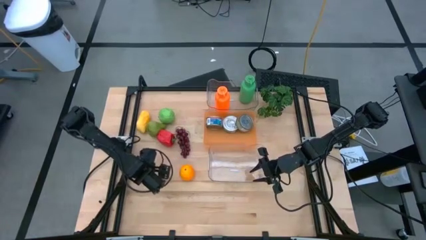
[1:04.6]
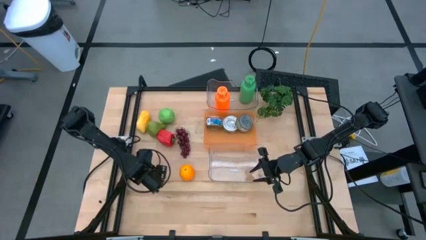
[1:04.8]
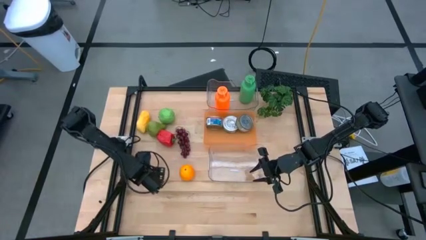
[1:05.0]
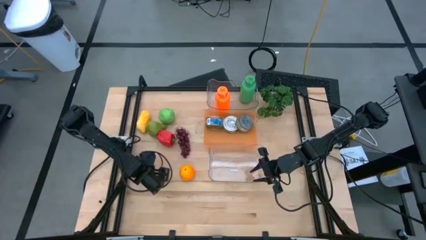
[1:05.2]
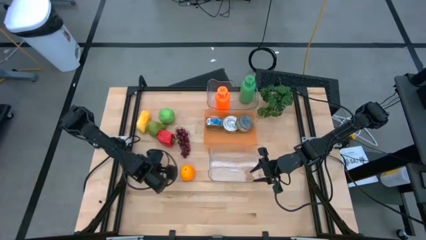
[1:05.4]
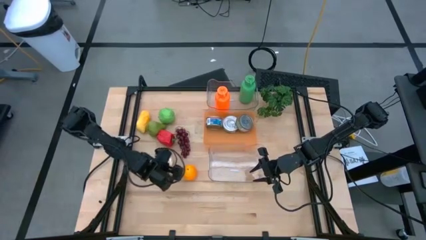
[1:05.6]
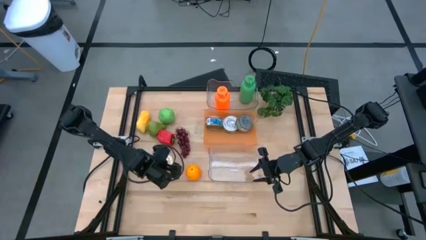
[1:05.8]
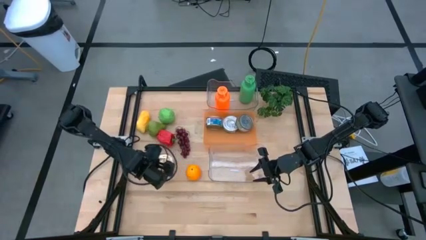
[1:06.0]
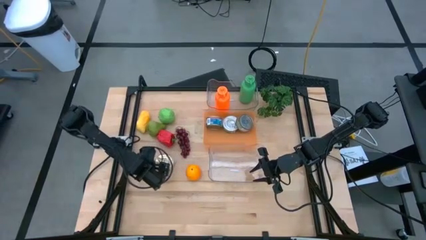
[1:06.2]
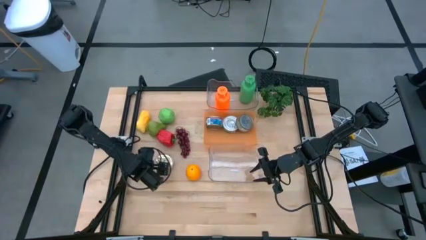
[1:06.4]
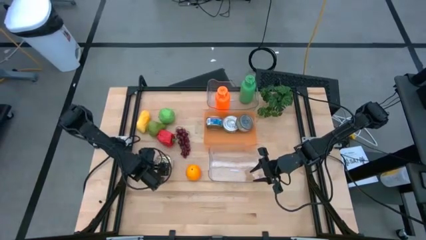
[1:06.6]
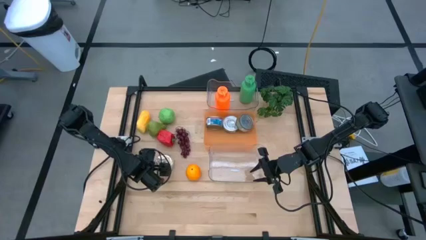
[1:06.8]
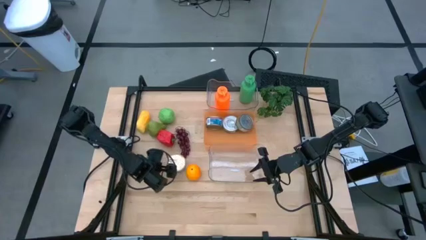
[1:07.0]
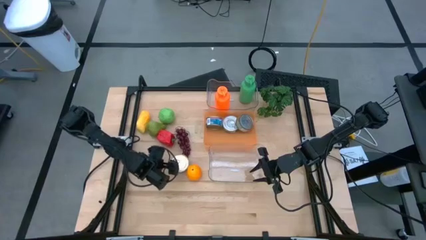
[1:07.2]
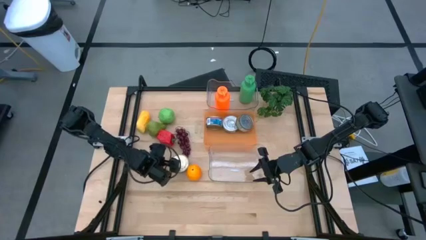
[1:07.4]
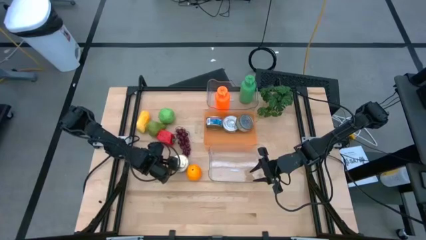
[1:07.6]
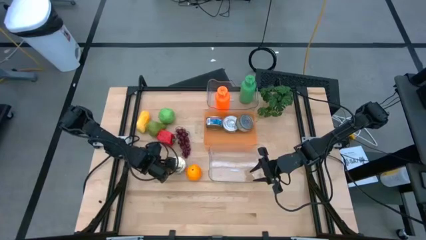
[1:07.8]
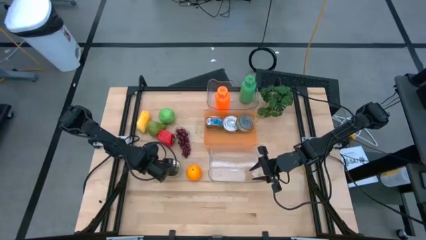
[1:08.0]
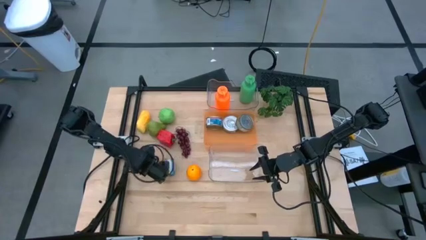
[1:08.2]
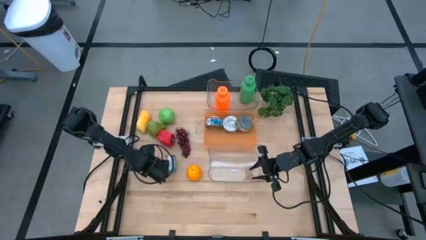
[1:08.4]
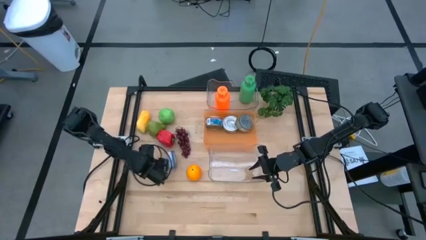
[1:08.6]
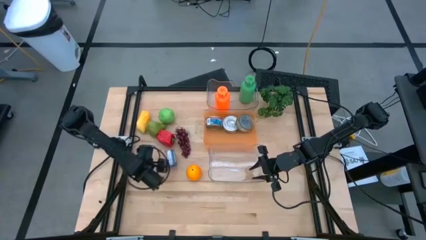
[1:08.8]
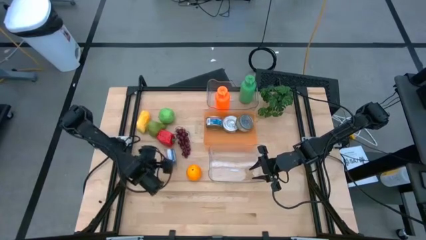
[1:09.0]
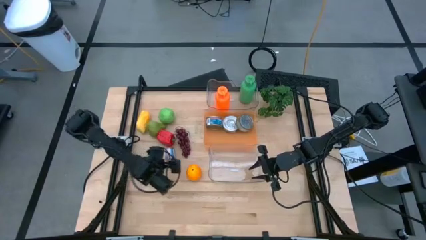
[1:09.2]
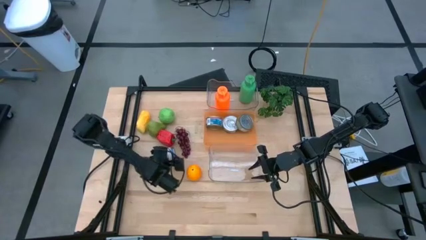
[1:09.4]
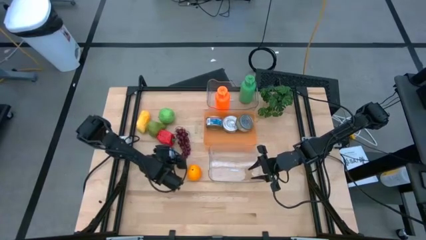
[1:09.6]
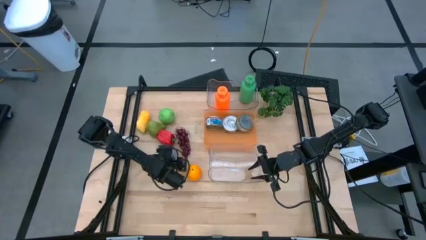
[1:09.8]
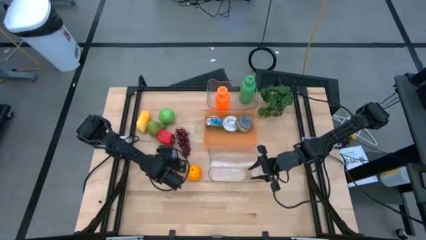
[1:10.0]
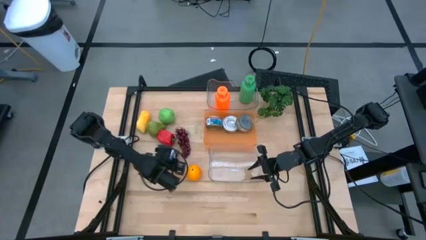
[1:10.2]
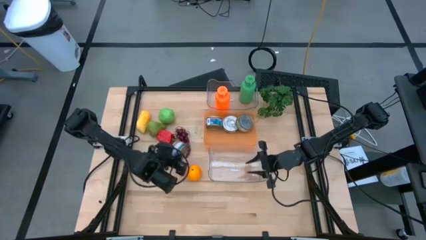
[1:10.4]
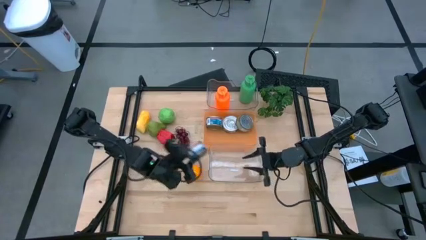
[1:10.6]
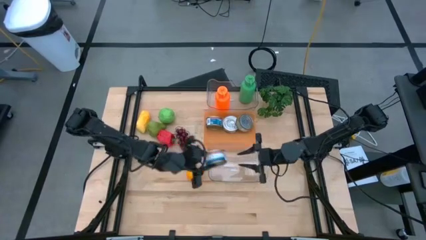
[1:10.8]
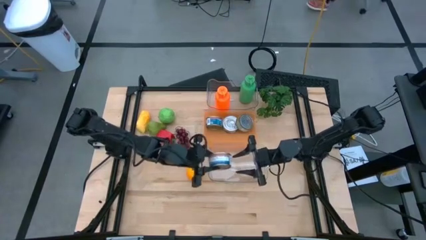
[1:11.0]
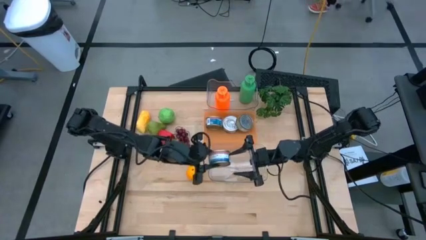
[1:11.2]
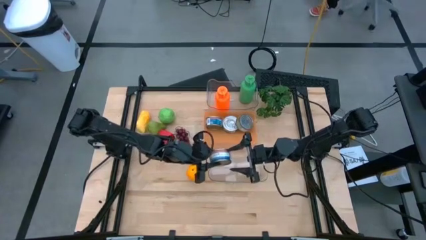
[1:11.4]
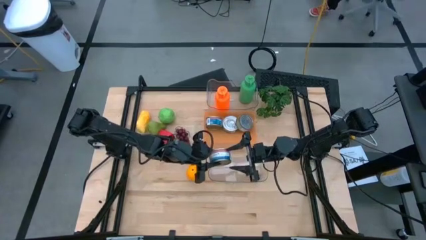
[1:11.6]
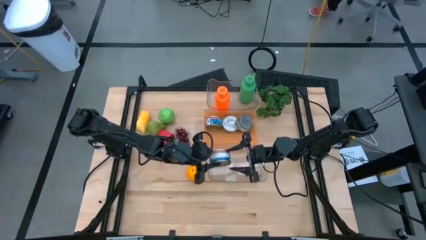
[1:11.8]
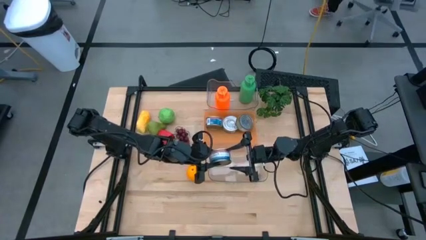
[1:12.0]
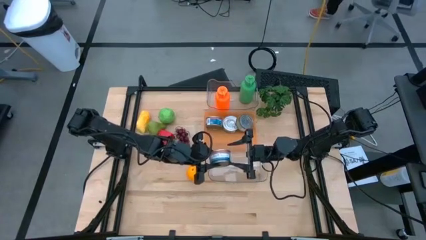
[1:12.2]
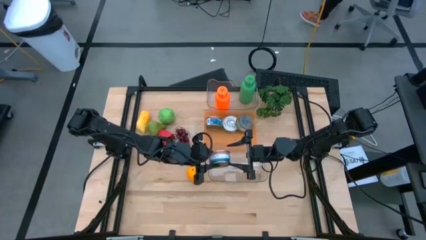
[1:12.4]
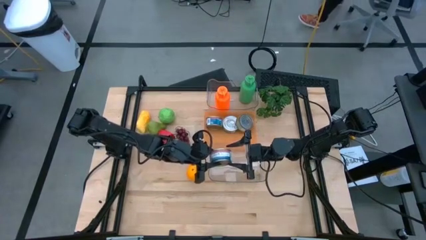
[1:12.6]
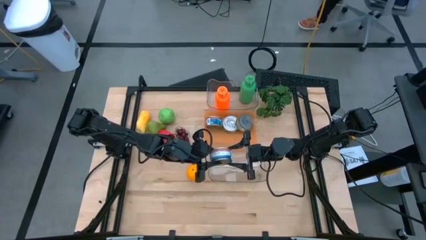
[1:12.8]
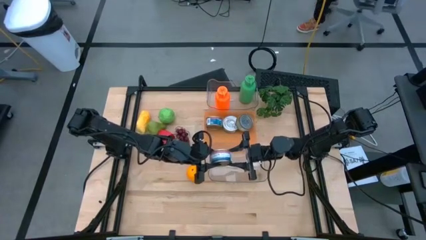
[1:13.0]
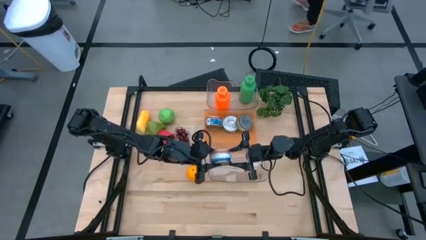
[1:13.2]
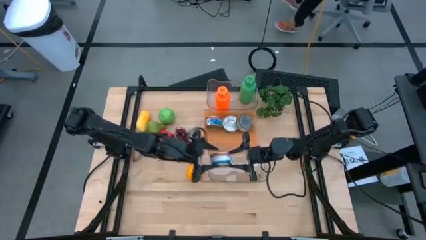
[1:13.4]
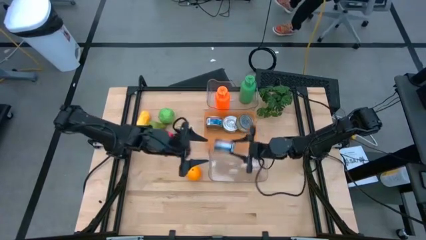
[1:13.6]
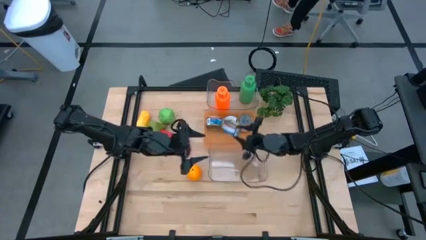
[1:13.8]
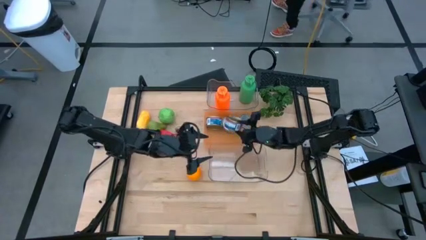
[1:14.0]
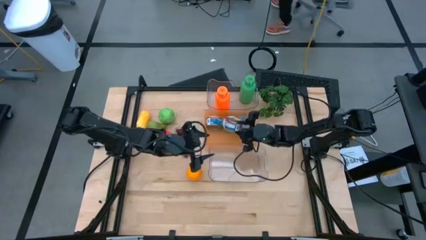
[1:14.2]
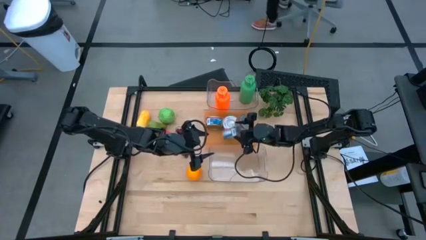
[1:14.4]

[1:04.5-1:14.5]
Task: Pick & Place Food Item
Put the blue pink tuna can into the orange bin

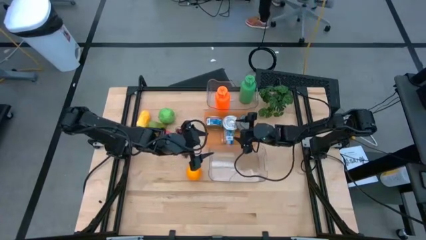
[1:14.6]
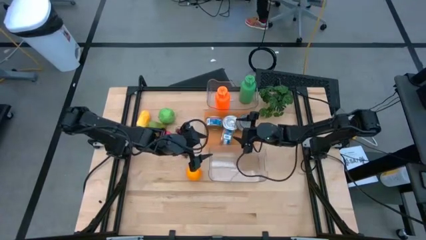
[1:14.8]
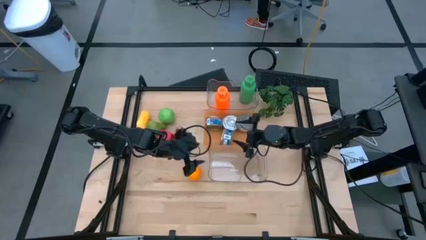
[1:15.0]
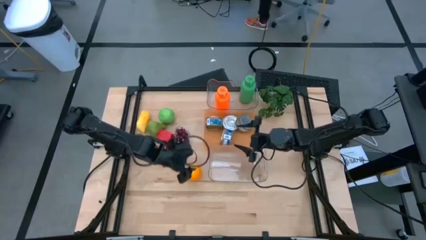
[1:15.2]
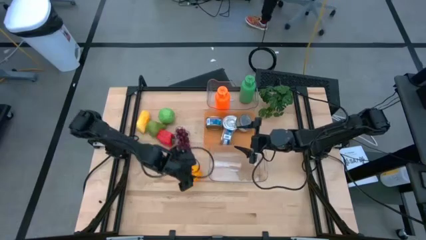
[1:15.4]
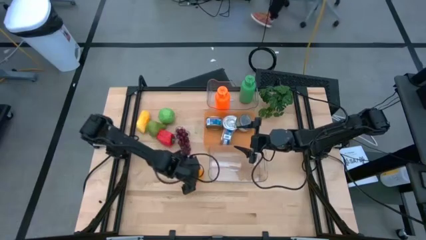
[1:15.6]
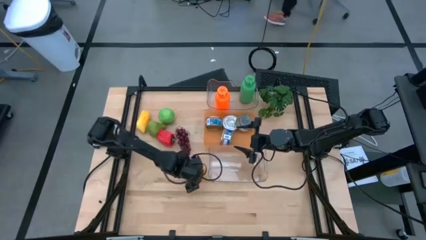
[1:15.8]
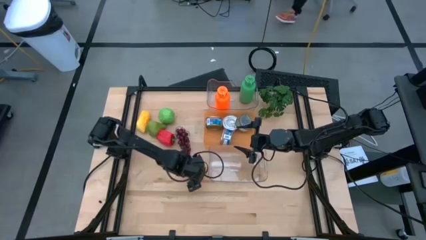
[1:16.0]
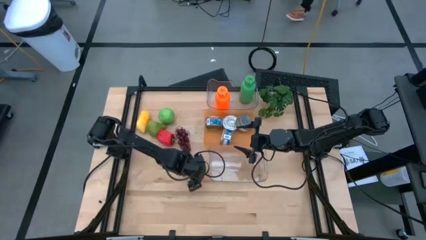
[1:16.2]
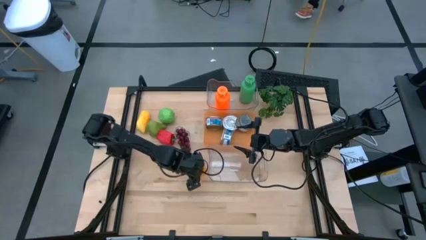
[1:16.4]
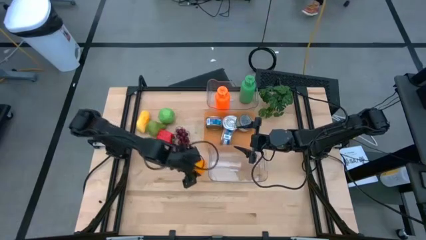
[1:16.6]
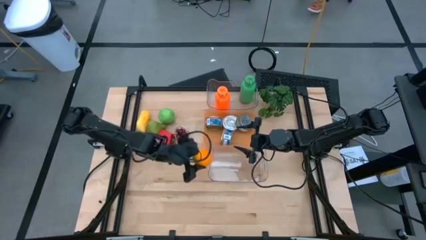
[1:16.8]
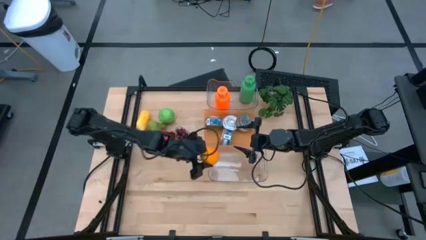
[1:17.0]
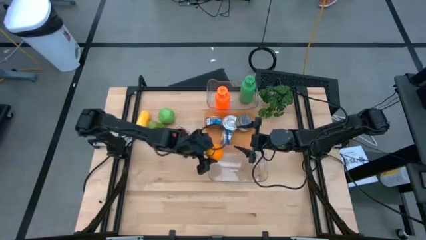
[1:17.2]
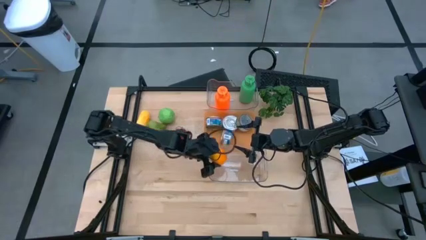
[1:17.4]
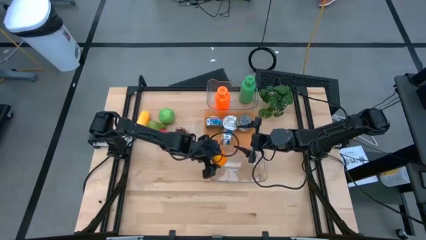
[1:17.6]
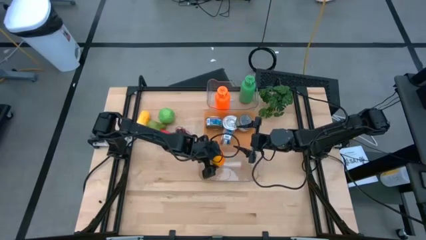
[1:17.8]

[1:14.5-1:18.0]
Put the orange into the bottom transparent bin

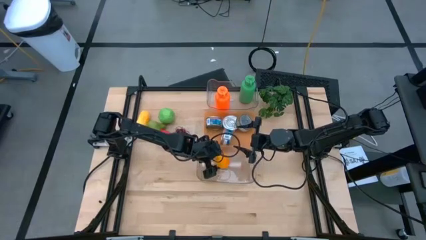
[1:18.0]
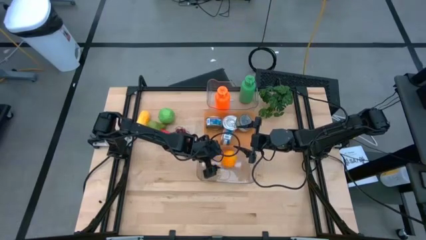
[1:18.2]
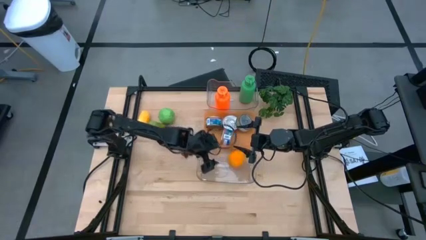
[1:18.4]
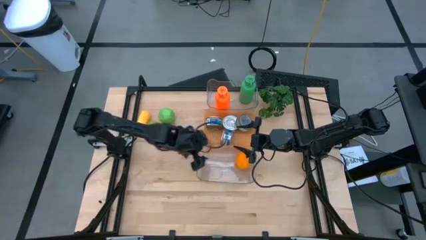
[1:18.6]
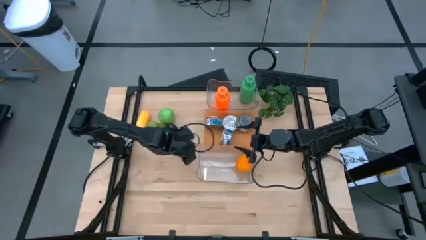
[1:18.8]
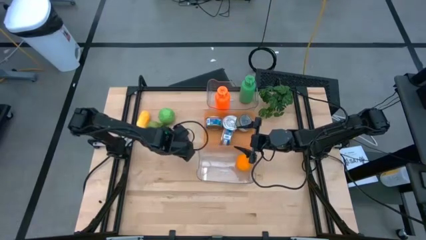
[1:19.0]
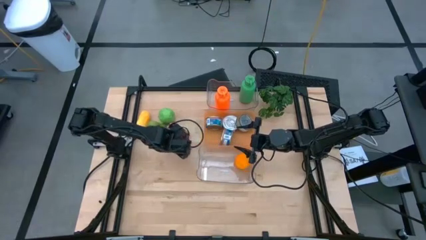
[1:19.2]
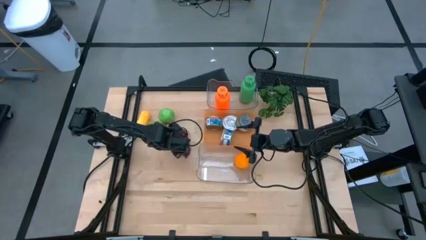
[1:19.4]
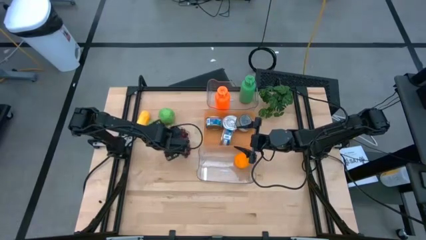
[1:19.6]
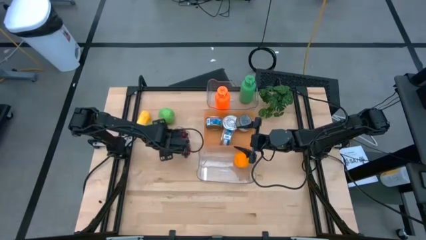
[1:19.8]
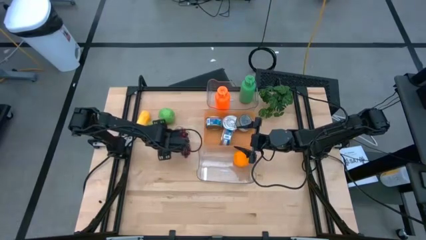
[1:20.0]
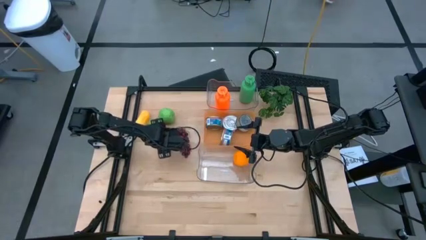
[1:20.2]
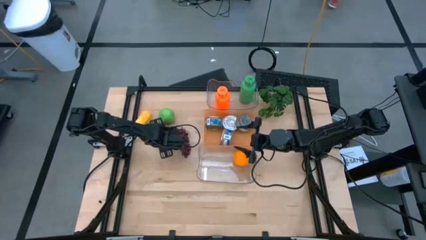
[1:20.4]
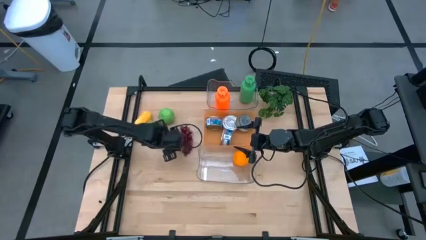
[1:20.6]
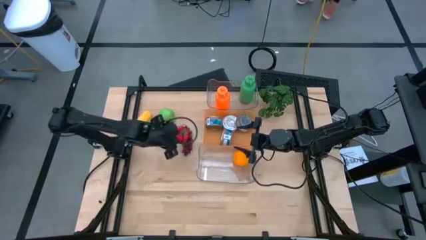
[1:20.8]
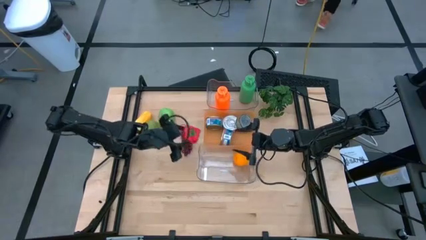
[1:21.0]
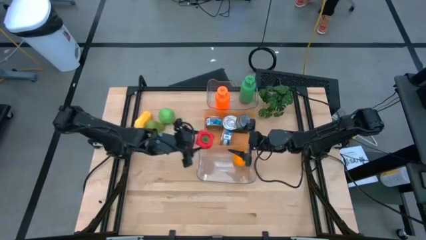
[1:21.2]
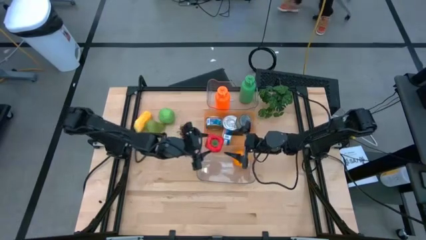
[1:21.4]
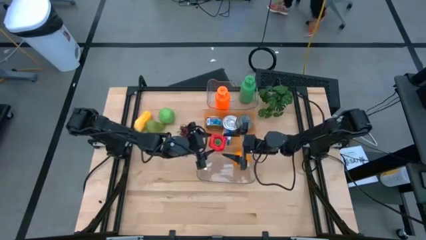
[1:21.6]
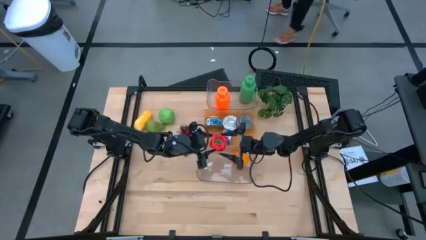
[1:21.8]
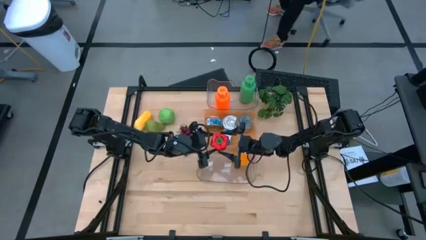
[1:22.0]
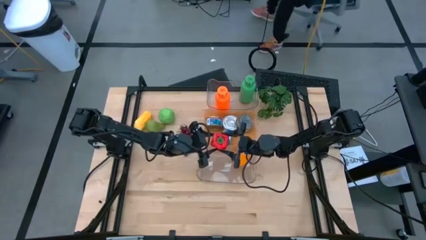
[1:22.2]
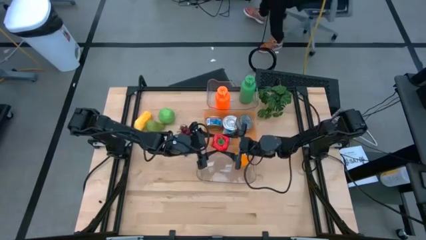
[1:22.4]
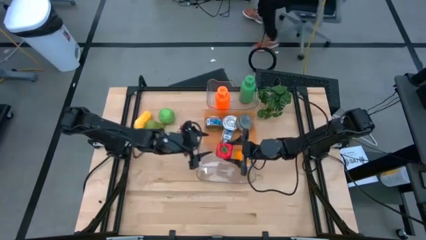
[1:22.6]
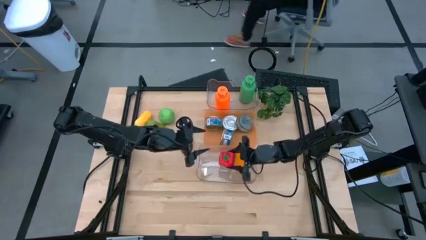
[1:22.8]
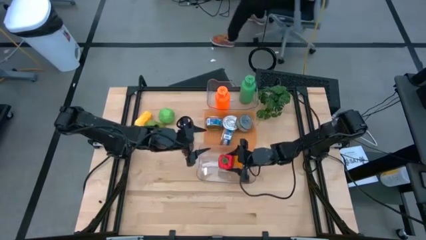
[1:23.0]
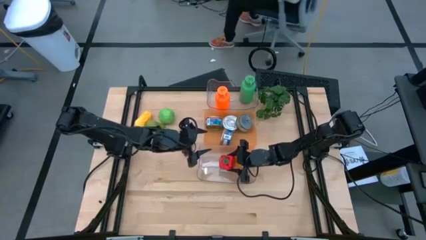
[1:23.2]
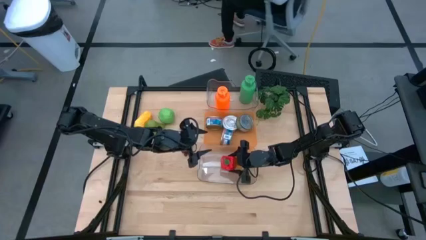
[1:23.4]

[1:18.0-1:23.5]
Put the red bell pepper into the bottom transparent bin
